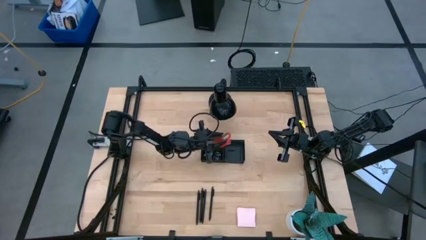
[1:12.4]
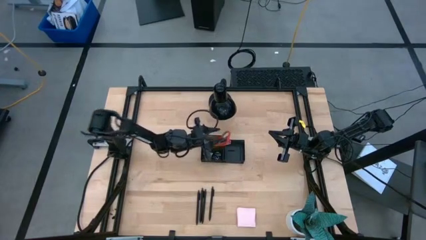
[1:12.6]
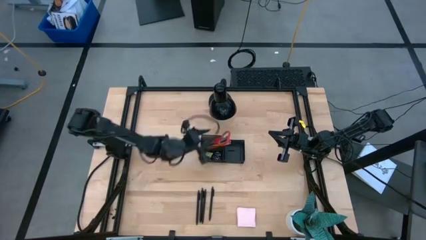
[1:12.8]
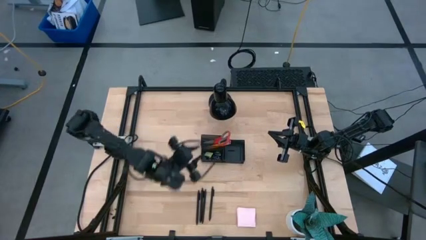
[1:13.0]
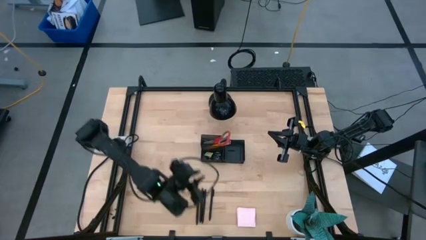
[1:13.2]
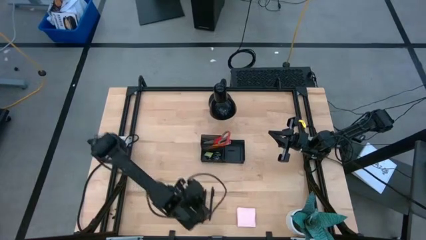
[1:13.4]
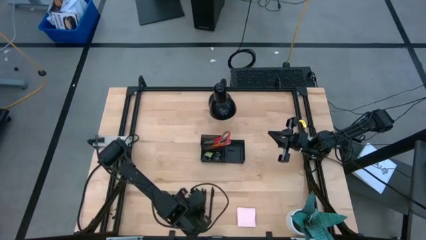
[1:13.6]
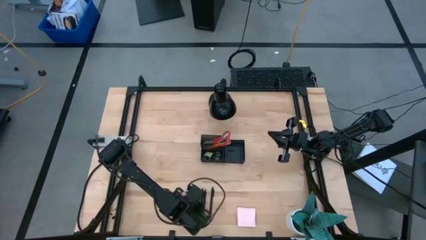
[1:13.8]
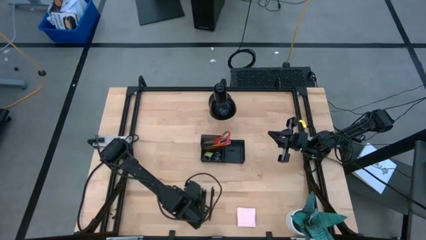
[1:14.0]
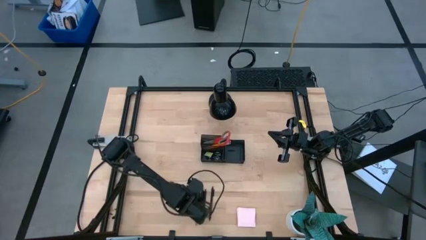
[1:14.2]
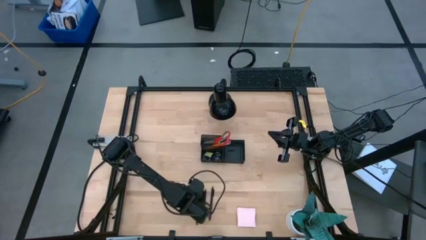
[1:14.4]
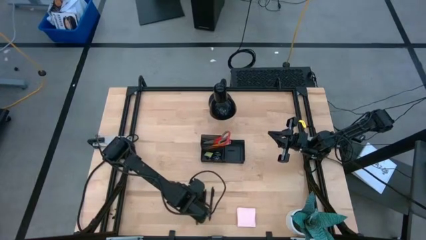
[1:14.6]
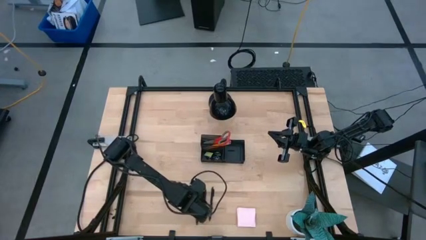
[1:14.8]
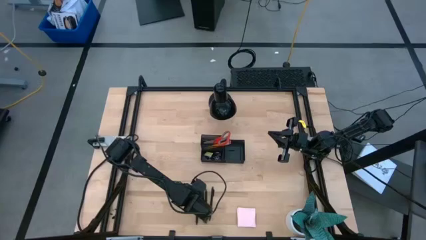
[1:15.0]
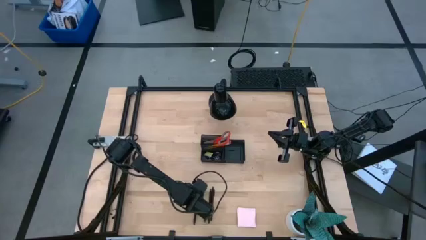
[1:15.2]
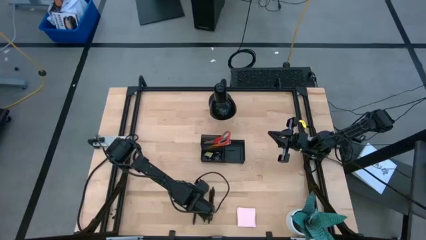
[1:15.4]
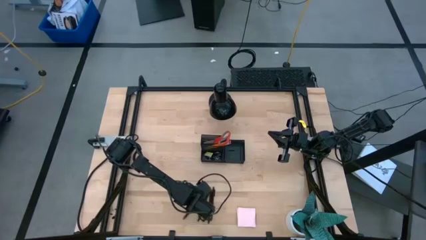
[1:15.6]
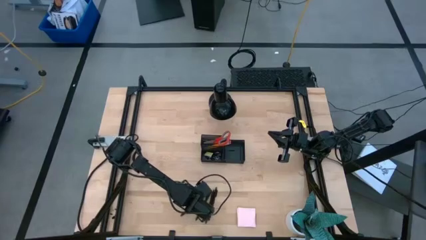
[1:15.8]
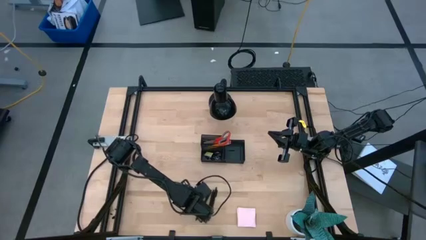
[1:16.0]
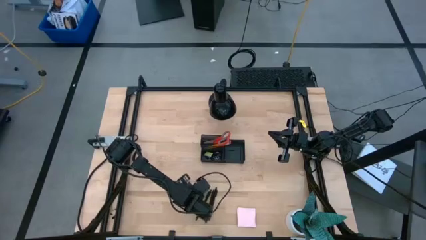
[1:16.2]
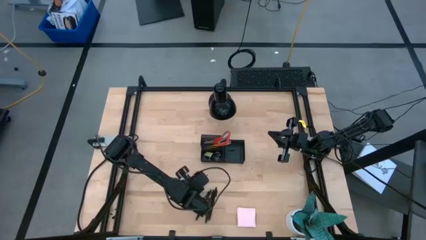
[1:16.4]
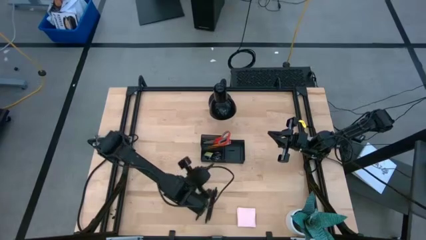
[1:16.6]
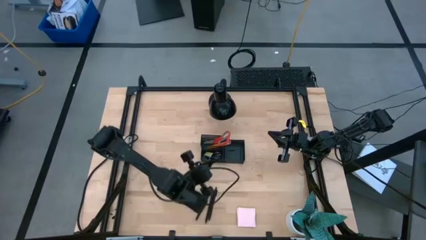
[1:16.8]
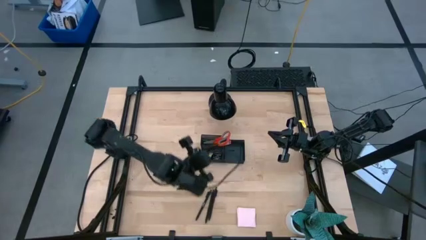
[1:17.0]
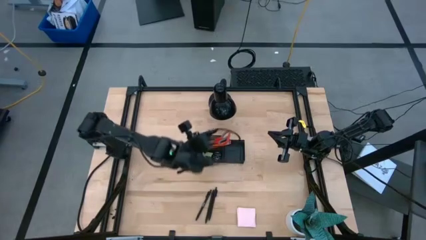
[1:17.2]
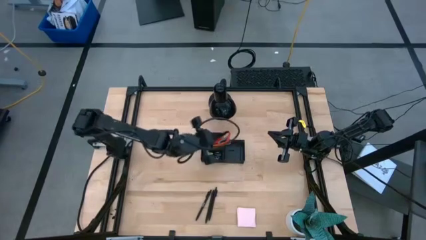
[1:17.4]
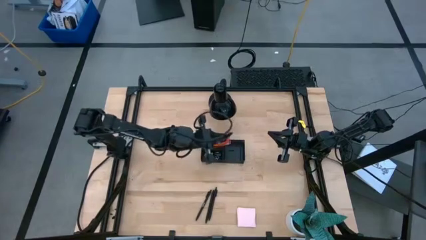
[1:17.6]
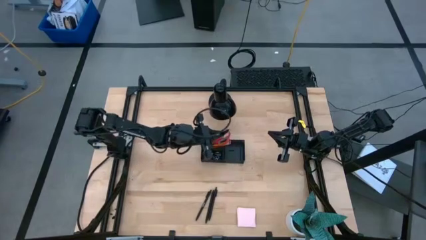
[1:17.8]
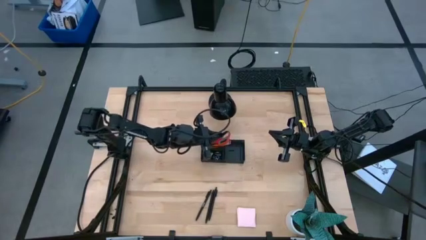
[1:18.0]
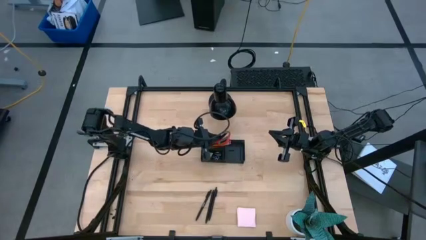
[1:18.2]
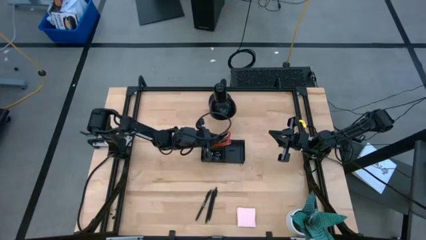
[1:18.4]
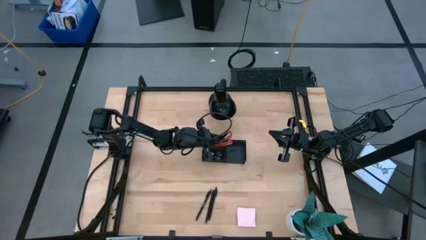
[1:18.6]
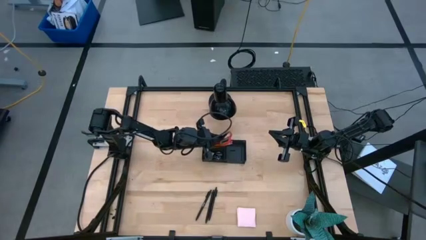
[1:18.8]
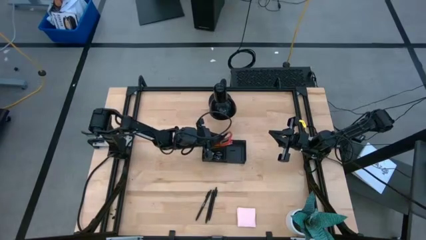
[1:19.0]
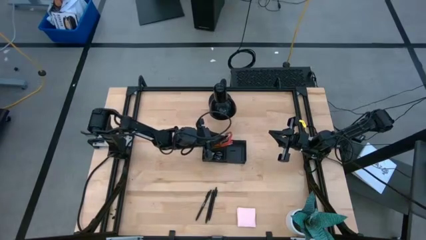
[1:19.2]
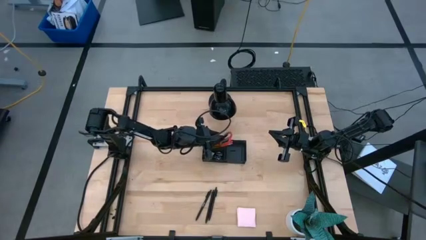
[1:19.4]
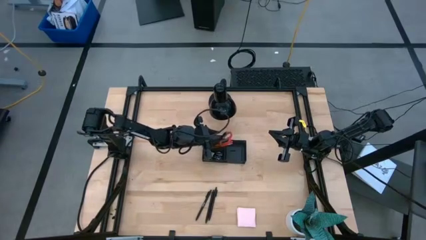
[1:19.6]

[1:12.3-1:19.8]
Task: Pick and place office supplies into organizer
Put the black pen into the black desk organizer

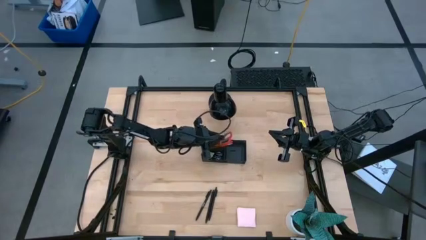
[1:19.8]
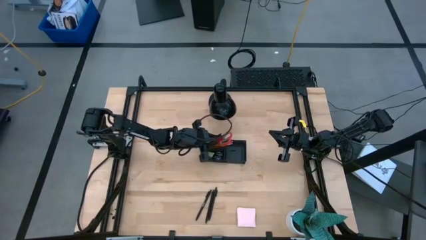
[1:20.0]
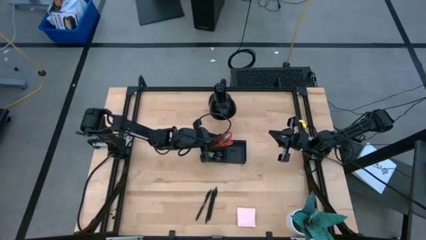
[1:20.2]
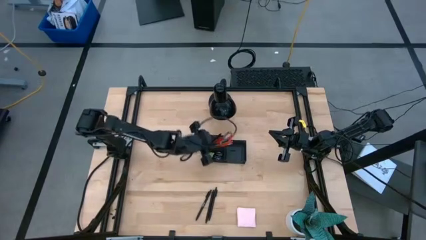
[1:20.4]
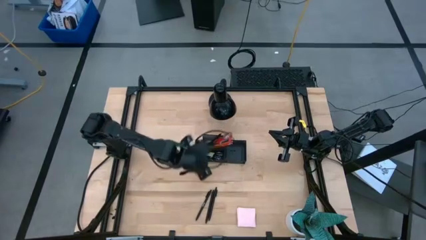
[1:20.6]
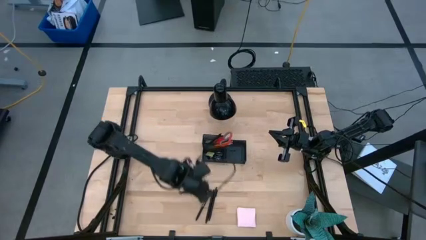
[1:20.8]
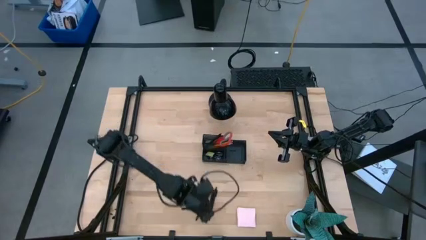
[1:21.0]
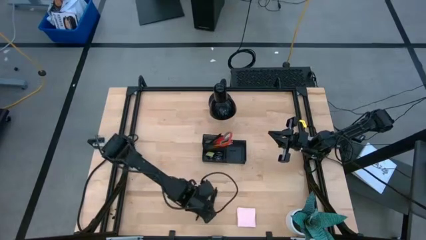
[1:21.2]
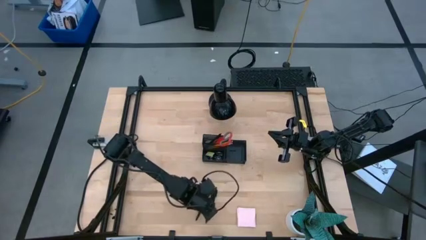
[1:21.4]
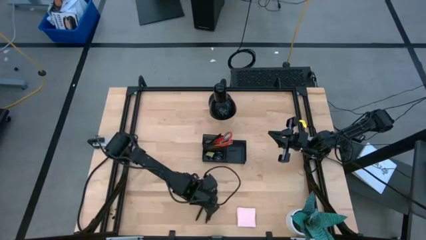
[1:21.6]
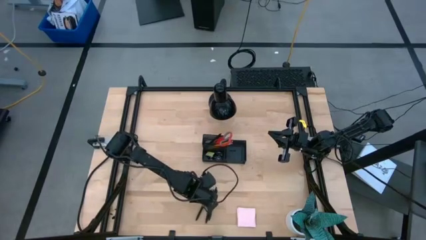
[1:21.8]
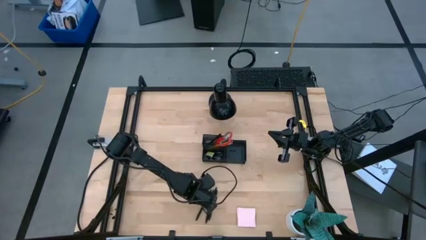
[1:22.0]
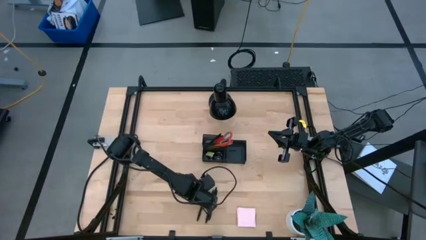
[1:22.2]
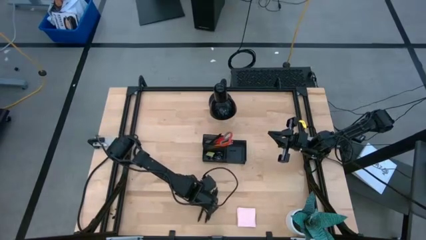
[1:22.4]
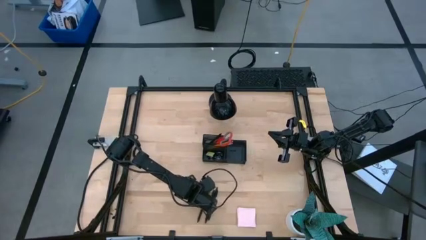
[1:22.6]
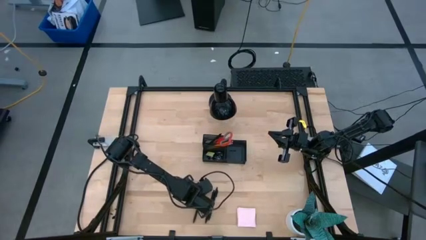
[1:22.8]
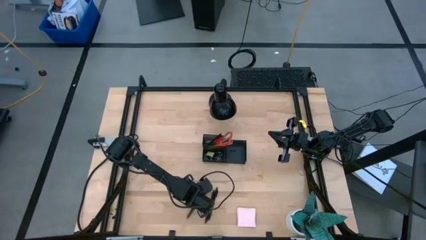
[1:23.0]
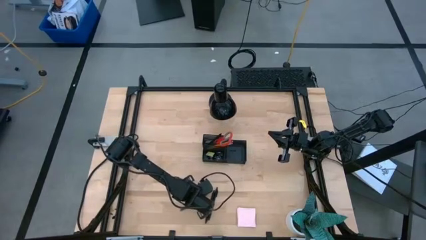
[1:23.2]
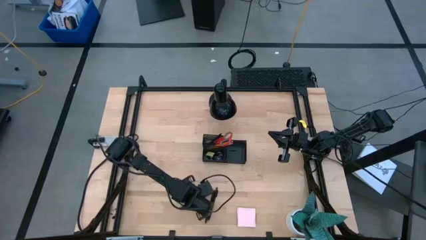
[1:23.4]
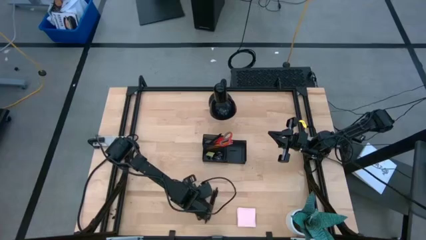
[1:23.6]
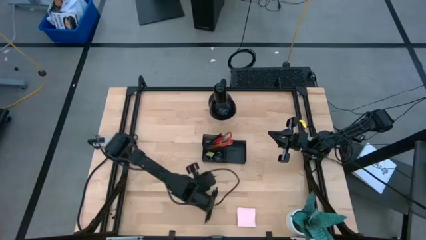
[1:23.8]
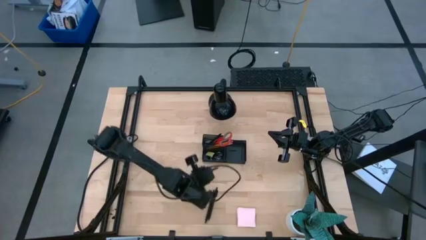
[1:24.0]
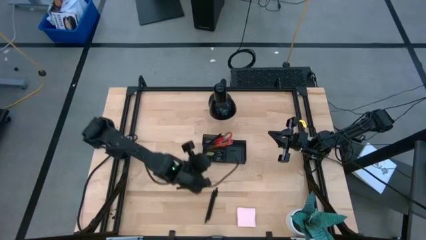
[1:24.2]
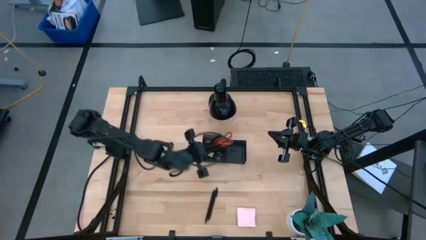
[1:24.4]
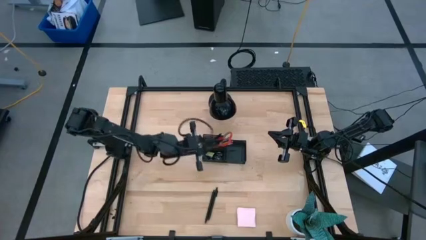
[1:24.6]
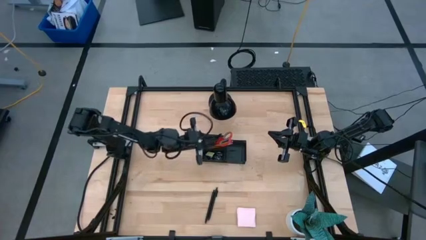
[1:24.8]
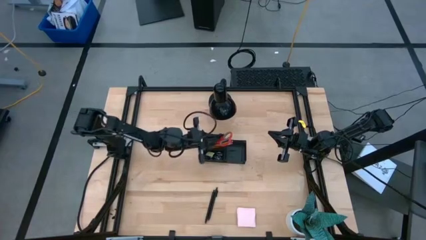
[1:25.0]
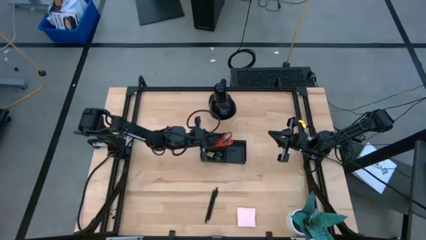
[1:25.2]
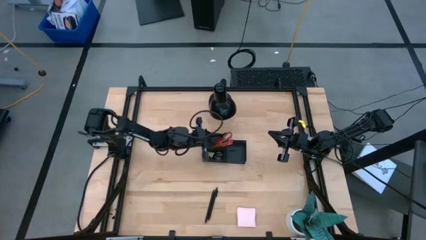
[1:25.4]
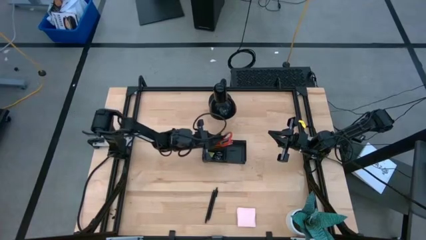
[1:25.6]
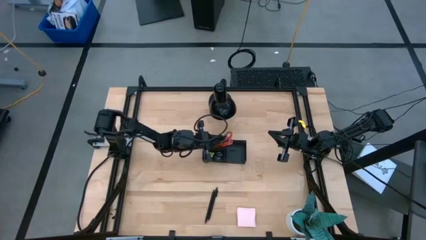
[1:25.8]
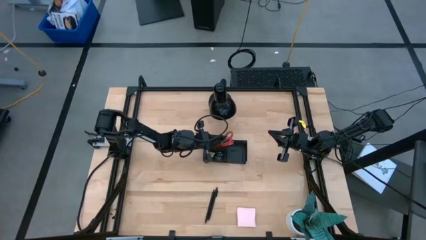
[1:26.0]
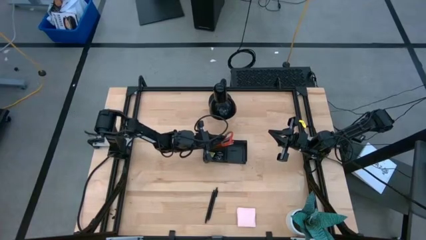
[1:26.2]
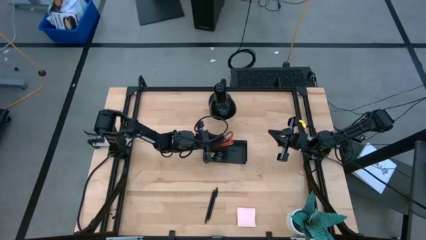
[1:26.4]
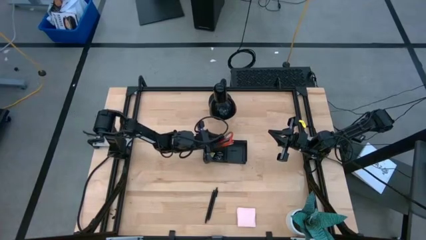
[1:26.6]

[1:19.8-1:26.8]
Put the black pen into the black desk organizer

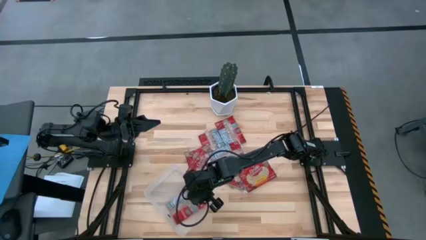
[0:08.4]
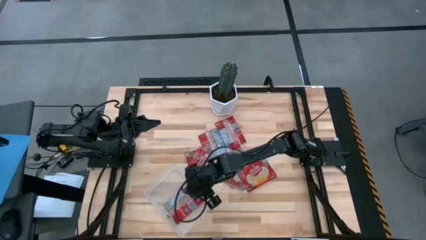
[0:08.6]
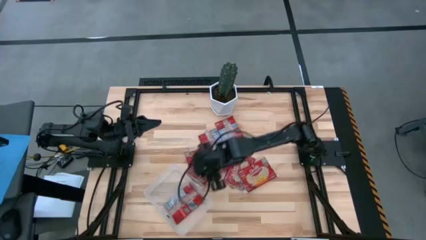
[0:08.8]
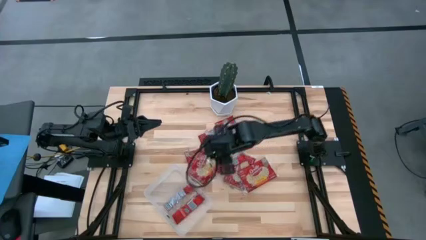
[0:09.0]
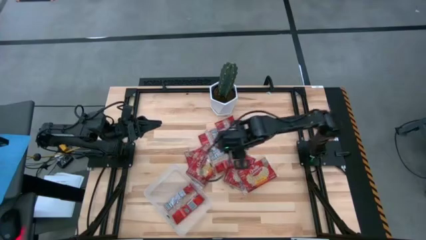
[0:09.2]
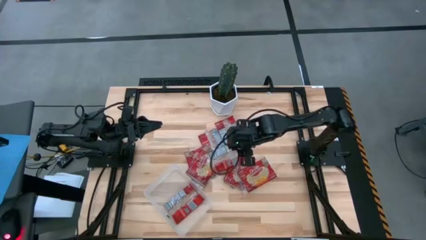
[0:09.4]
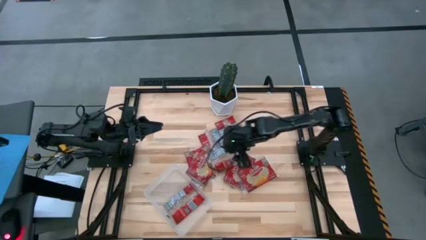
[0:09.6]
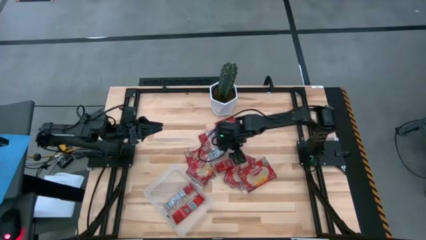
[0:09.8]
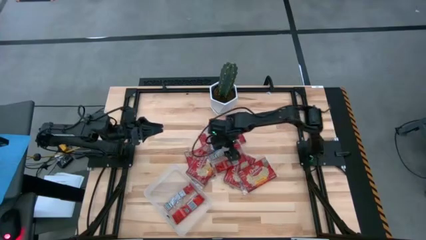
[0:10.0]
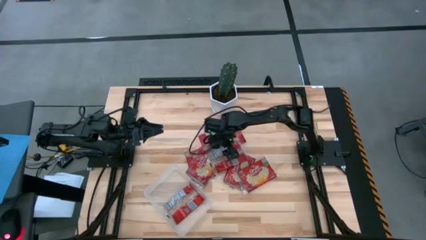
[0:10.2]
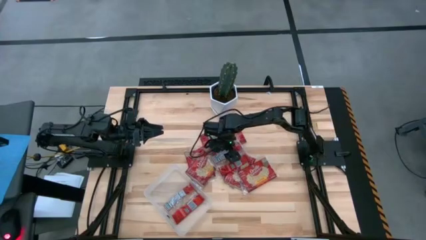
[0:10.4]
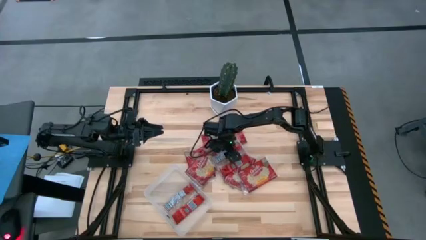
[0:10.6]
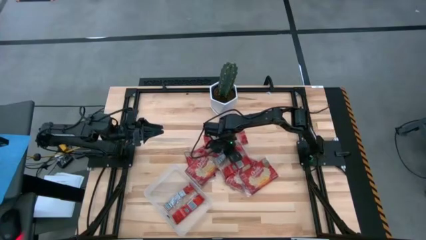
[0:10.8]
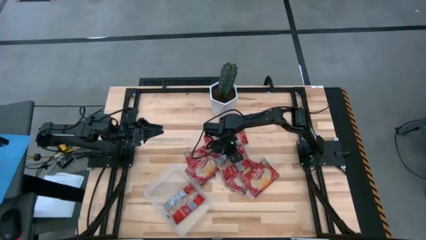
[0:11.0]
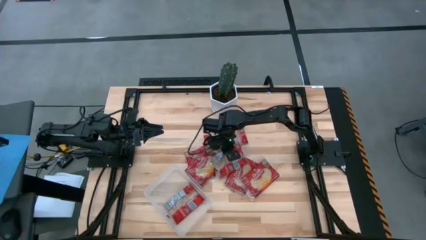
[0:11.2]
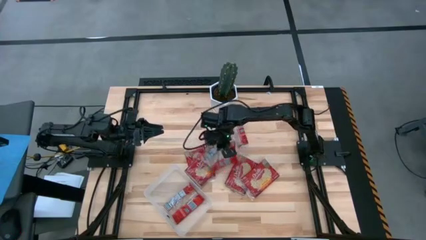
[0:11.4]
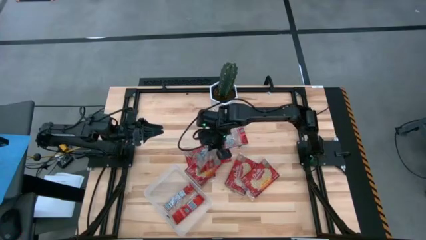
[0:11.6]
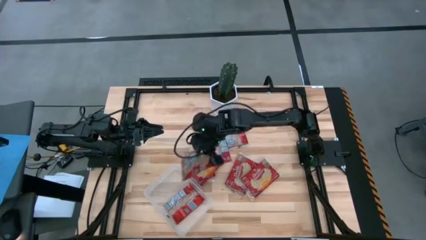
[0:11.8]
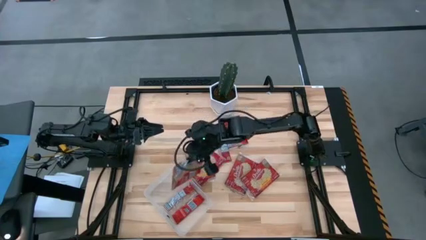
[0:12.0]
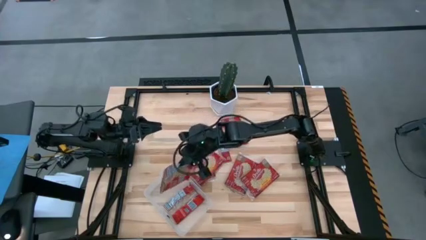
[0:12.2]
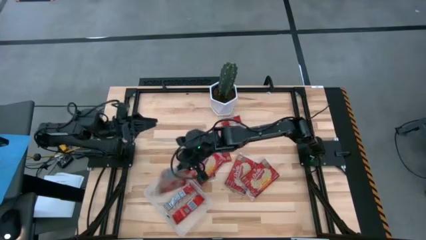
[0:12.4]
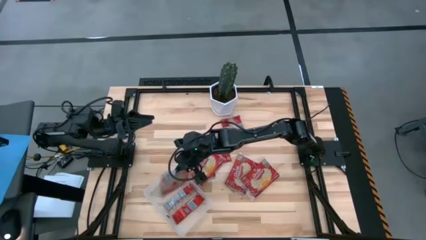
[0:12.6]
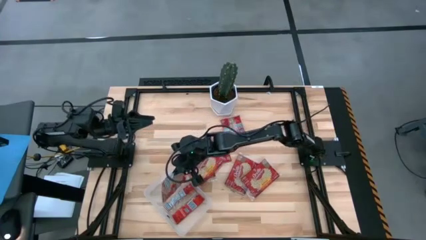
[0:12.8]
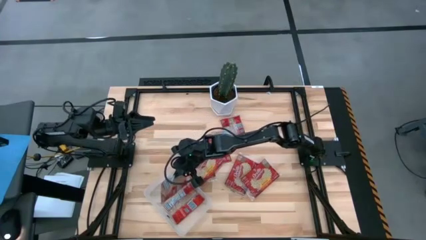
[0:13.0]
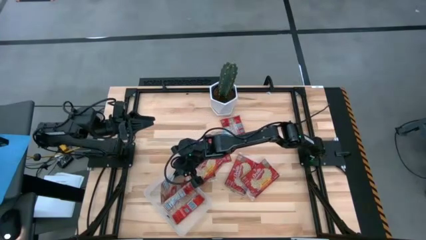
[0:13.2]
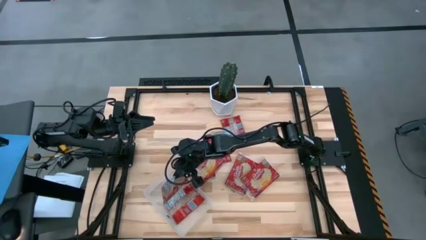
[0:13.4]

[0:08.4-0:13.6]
Task: Sort popcorn bags into baskets
Put the red popcorn bag into the transparent bin
